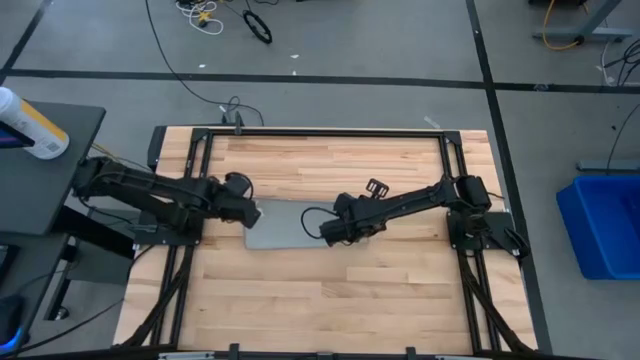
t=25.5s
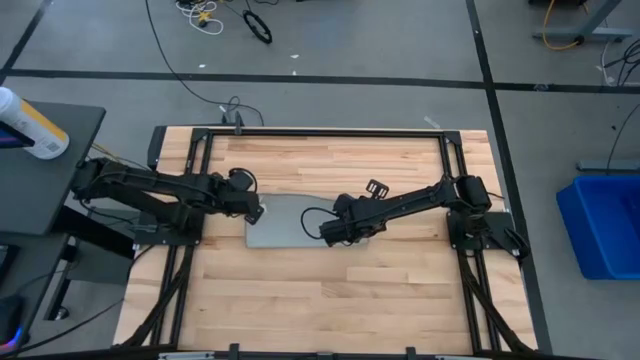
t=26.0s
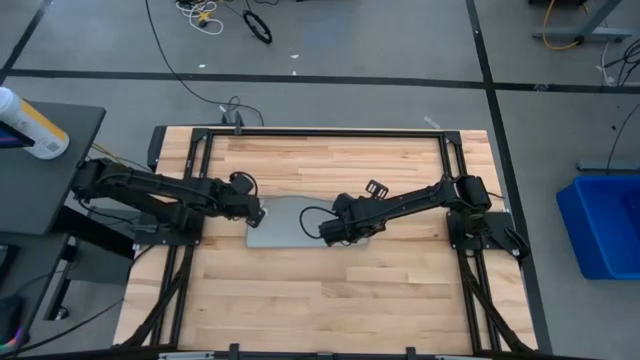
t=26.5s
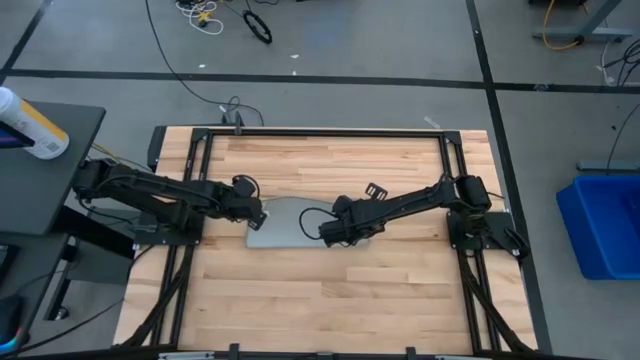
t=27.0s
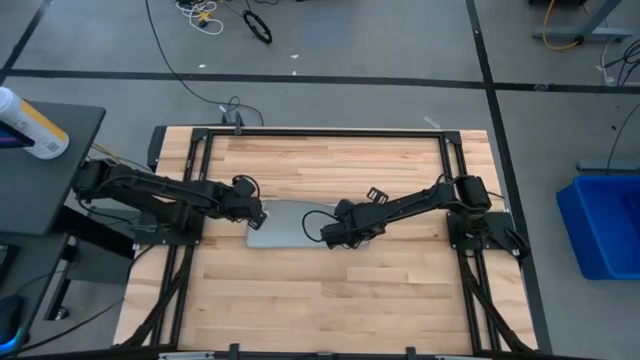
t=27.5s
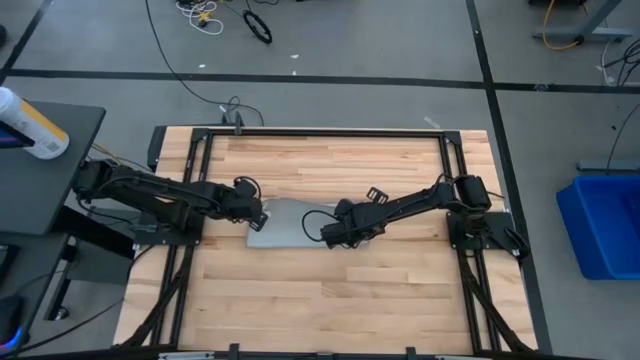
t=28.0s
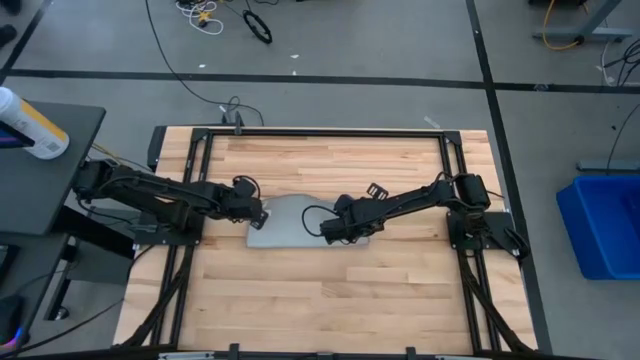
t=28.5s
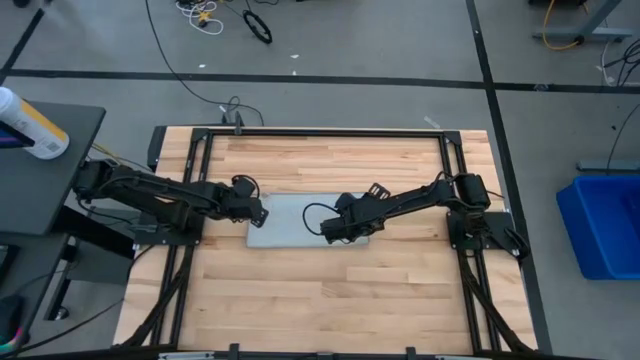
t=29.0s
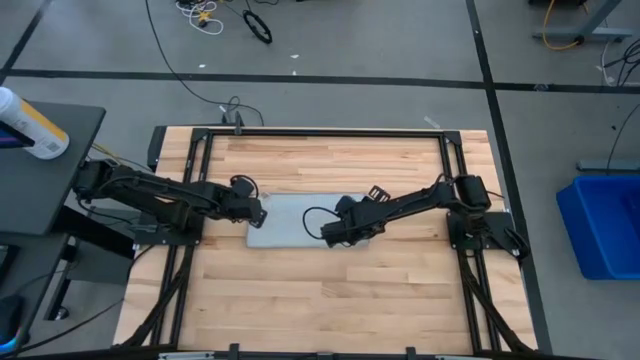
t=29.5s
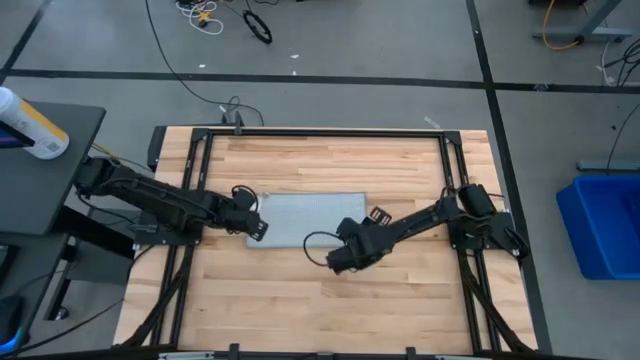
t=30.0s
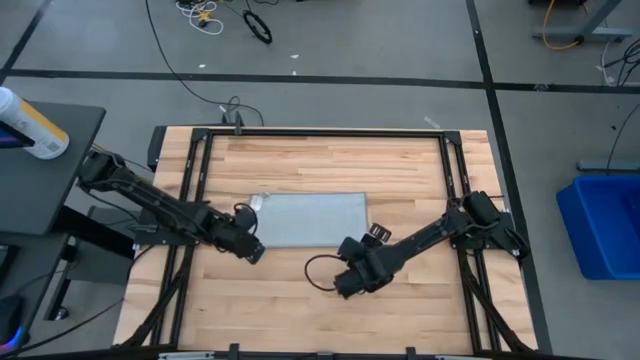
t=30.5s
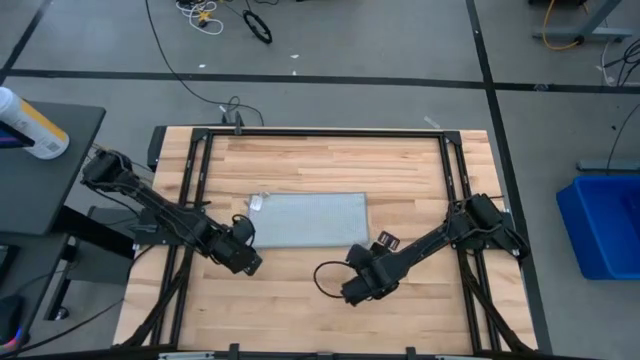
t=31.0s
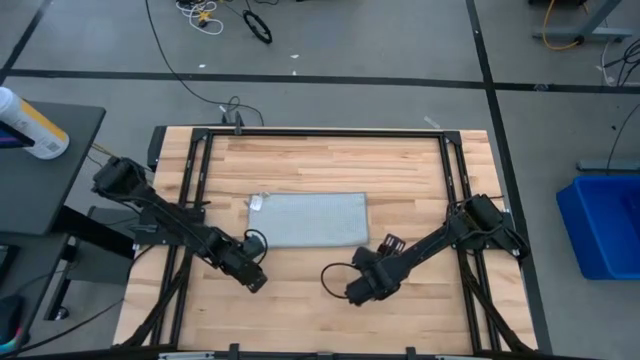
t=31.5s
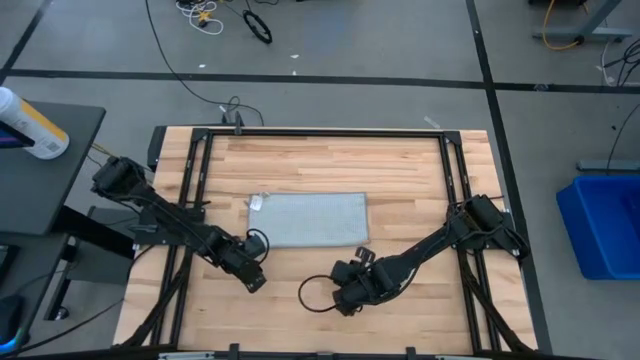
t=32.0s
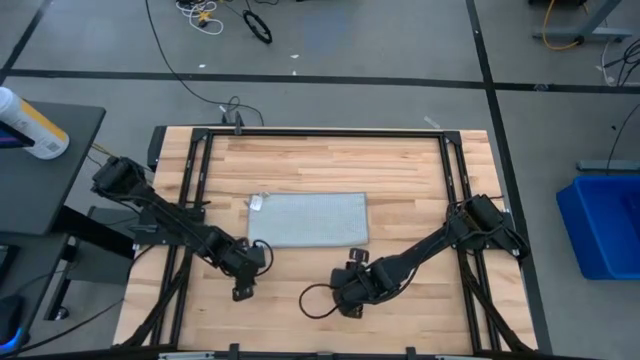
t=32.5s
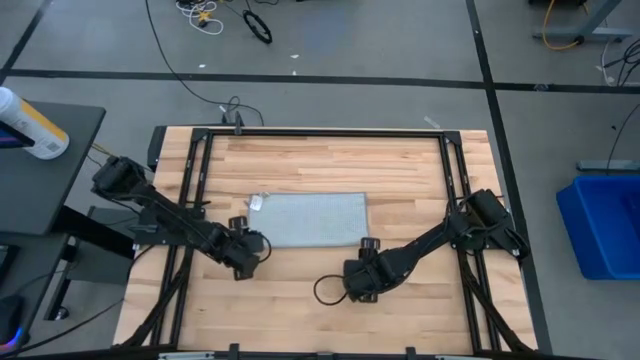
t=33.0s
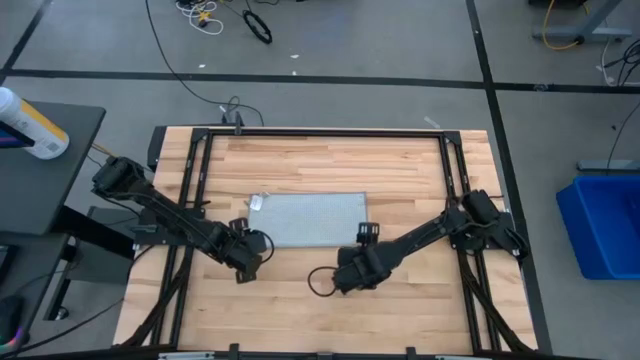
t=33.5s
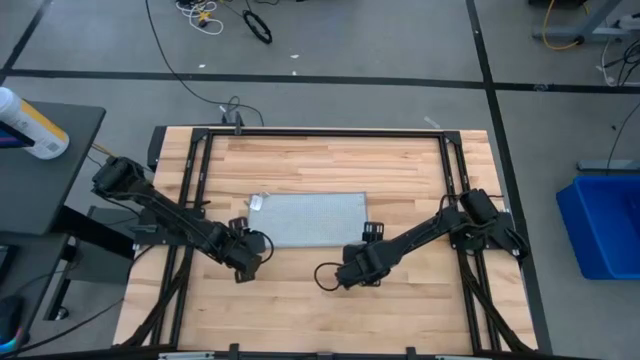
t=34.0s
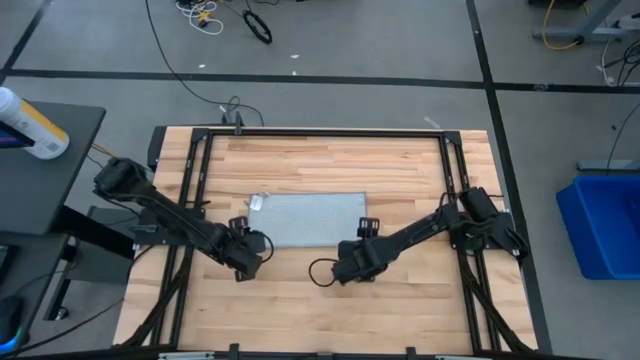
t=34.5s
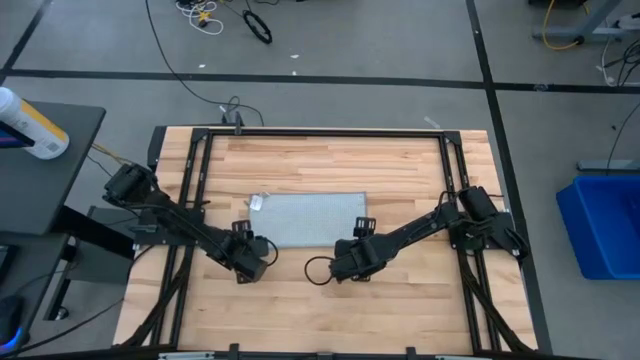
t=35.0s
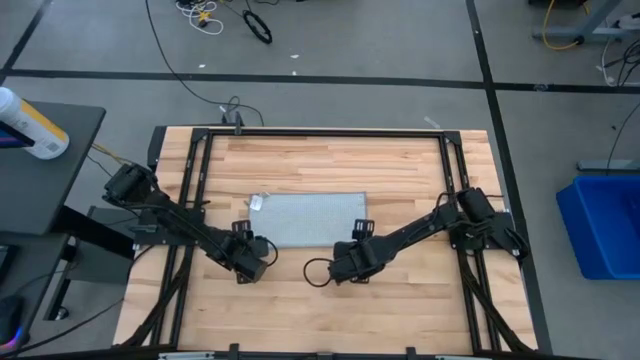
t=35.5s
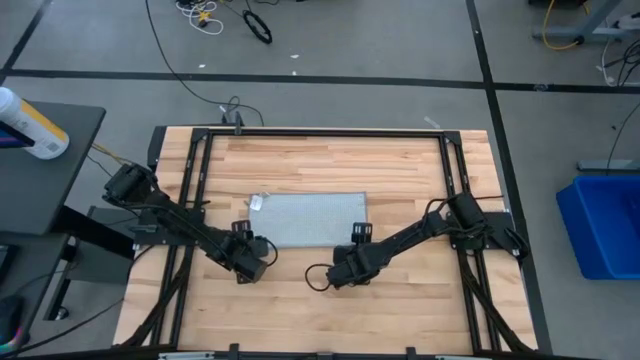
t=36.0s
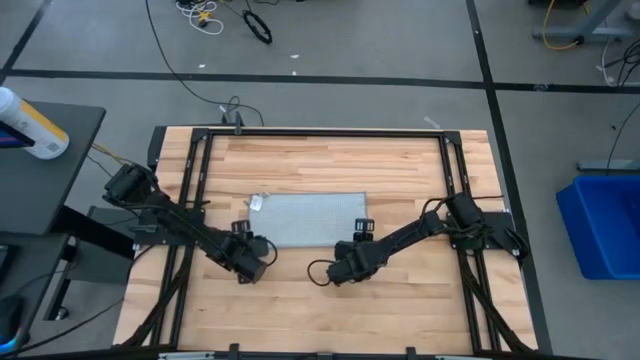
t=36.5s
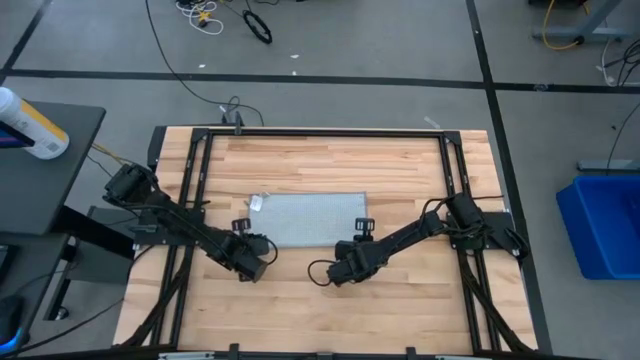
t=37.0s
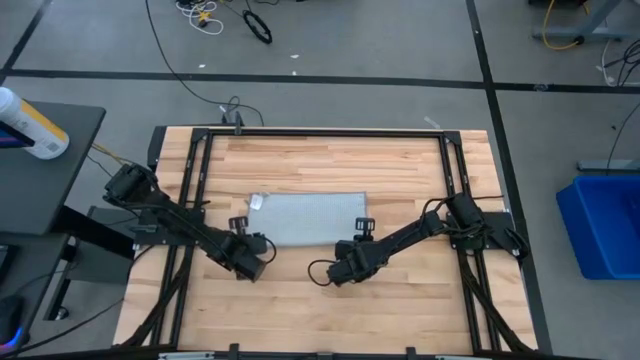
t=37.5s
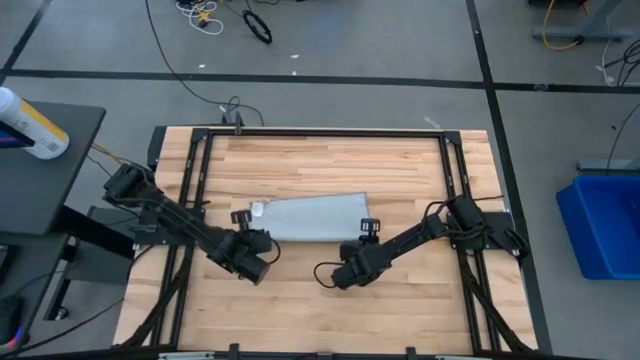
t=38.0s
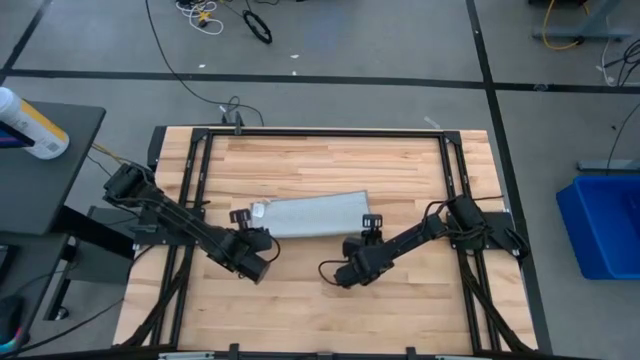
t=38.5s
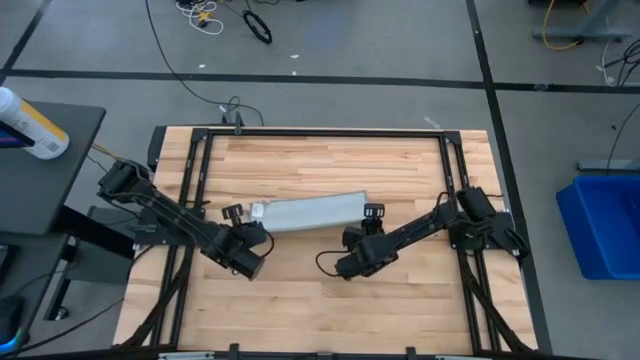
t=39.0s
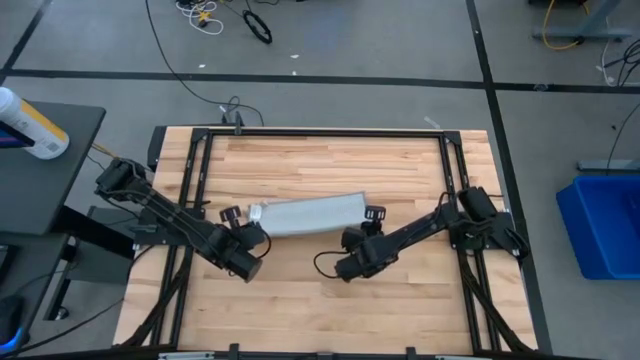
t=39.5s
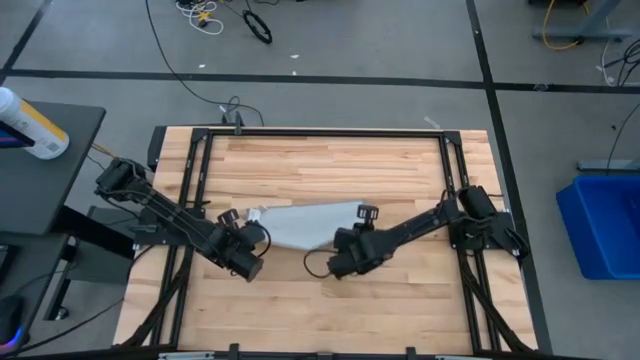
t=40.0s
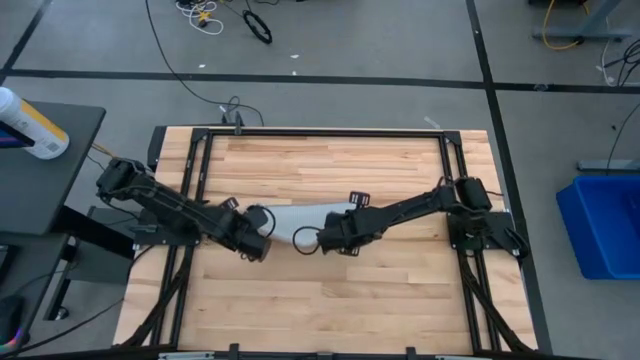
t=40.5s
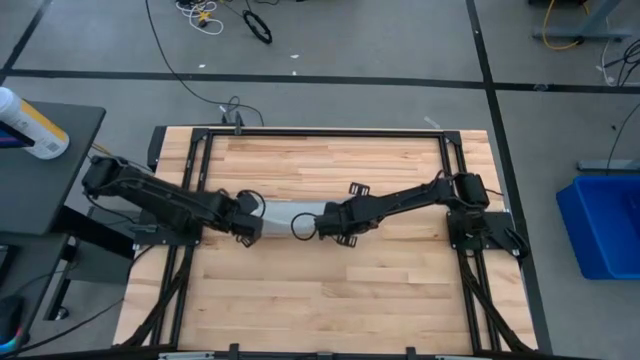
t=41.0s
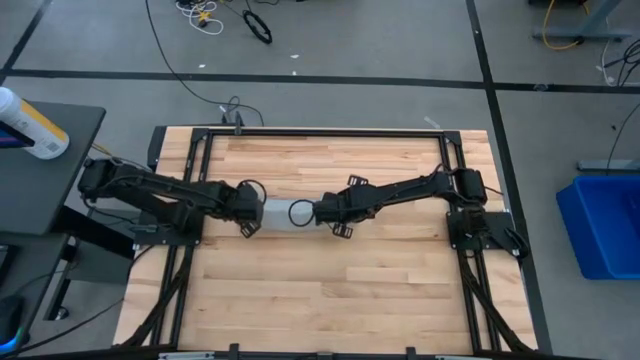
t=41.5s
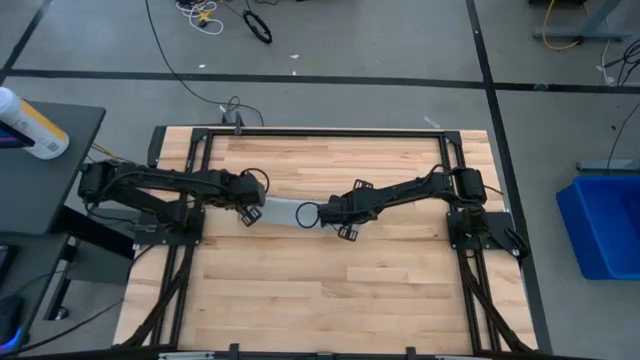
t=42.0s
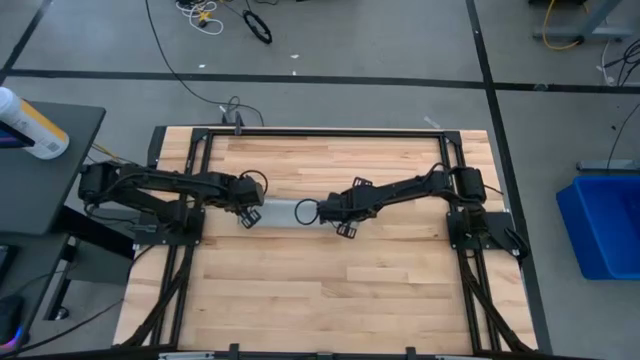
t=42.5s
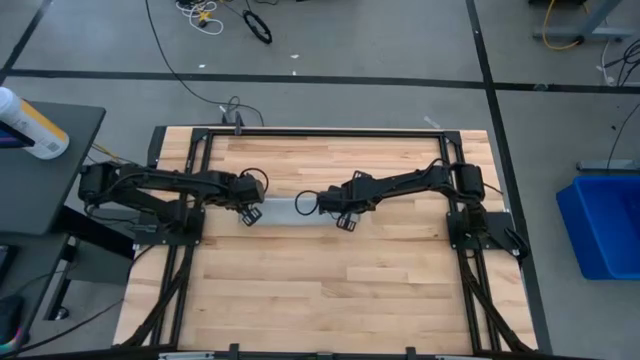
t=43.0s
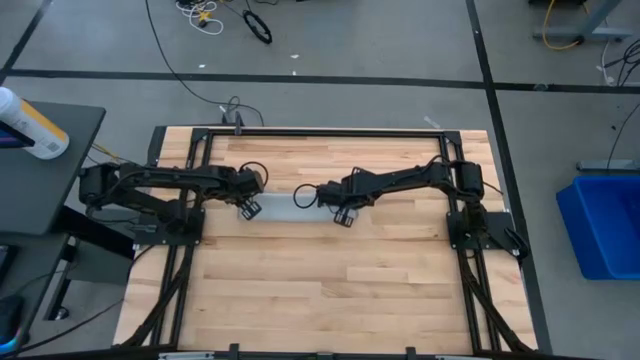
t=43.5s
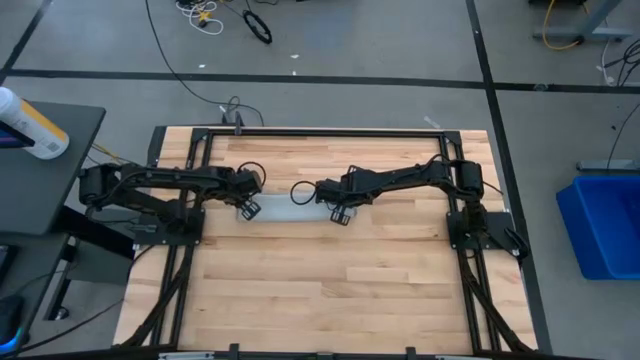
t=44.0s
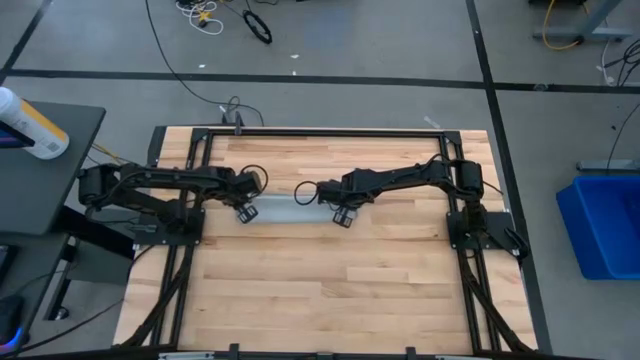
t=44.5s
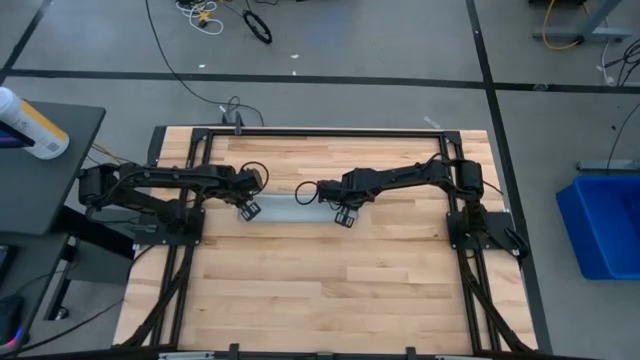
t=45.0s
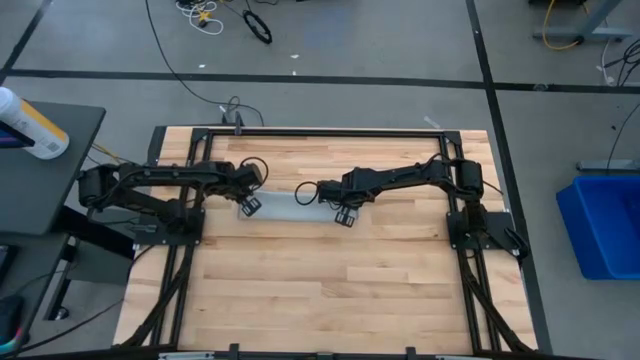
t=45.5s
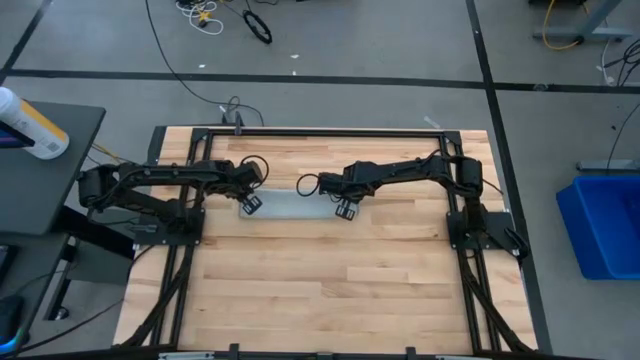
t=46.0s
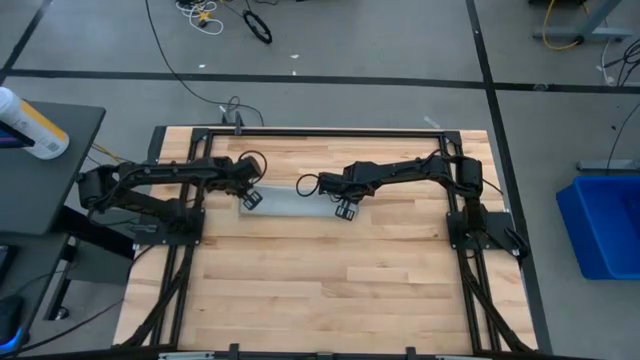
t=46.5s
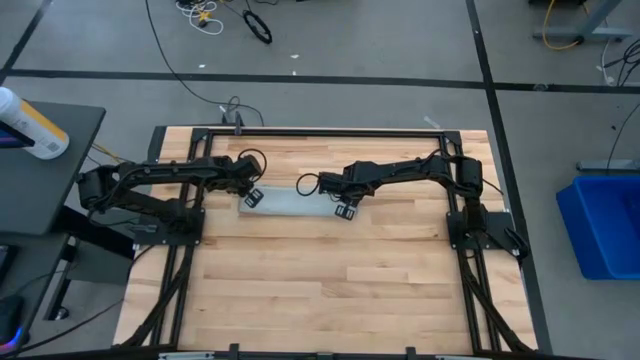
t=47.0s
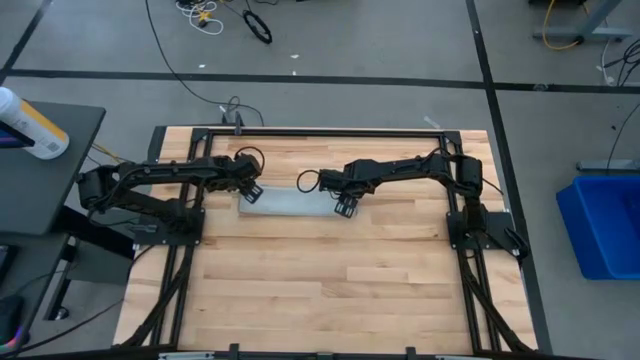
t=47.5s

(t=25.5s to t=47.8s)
Task: Fold microfiber towels
Fold the gray microfiber towel
